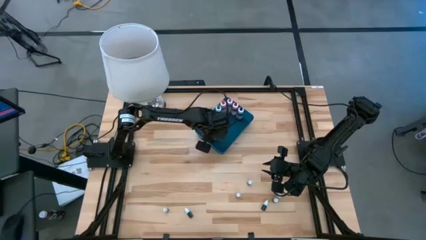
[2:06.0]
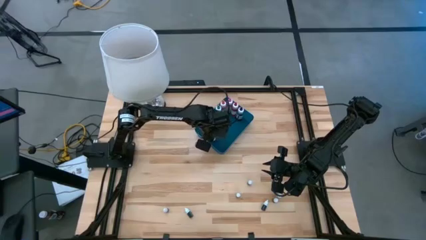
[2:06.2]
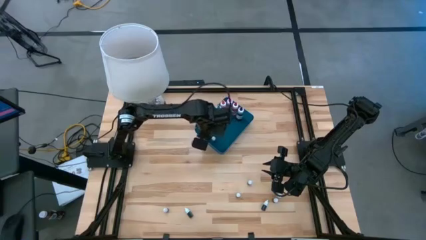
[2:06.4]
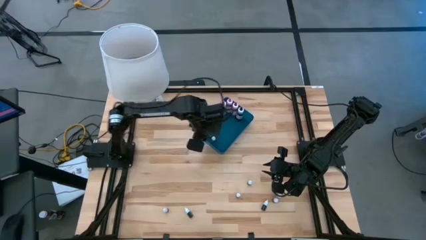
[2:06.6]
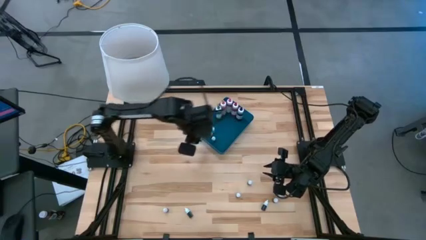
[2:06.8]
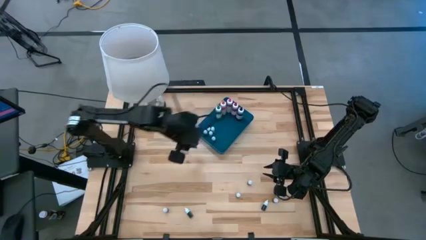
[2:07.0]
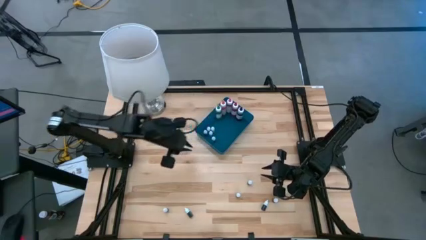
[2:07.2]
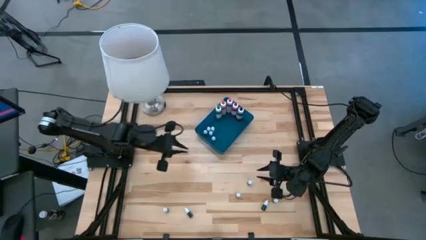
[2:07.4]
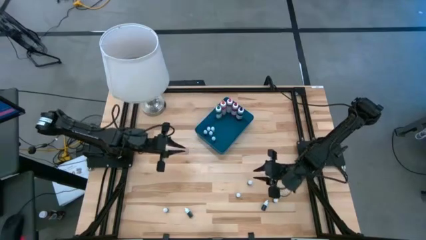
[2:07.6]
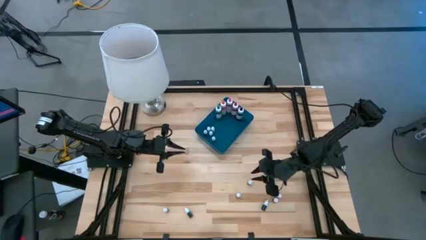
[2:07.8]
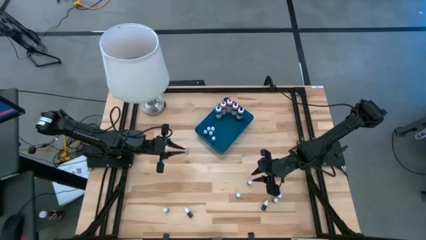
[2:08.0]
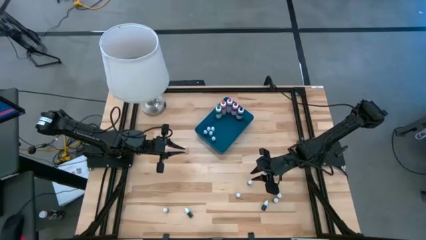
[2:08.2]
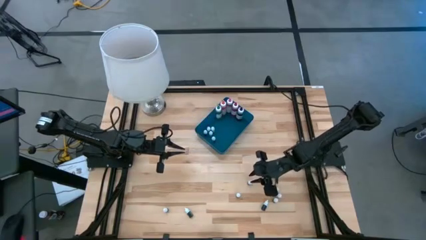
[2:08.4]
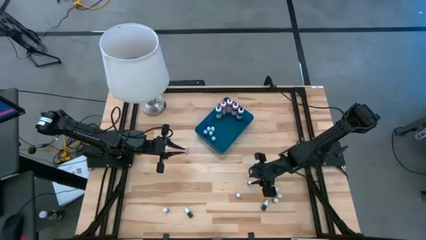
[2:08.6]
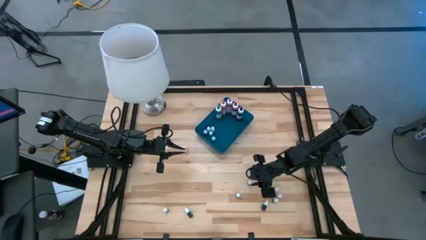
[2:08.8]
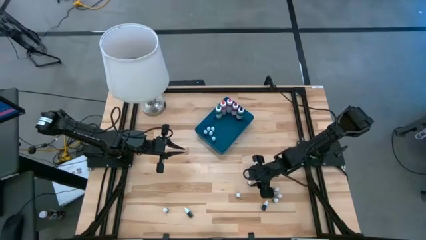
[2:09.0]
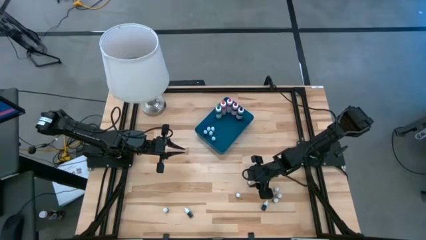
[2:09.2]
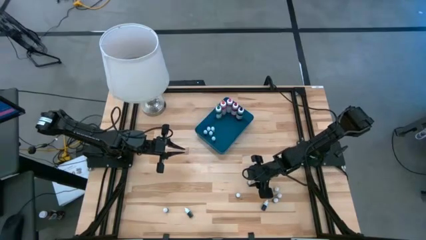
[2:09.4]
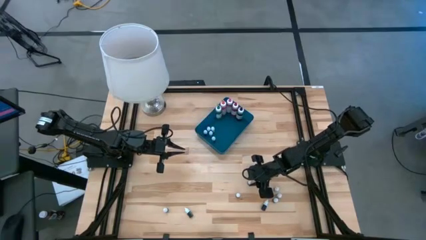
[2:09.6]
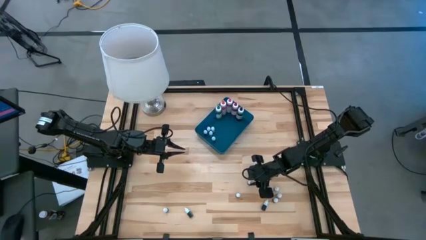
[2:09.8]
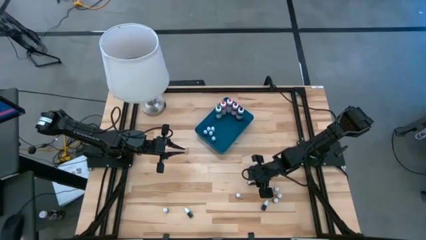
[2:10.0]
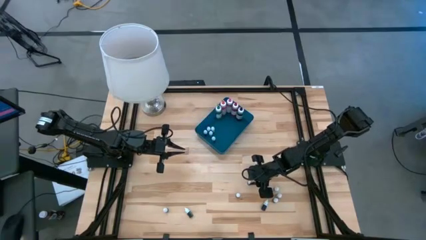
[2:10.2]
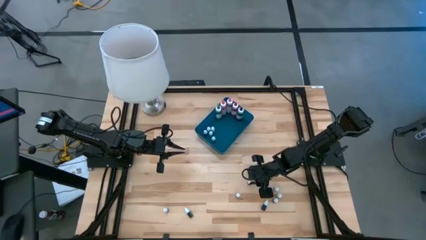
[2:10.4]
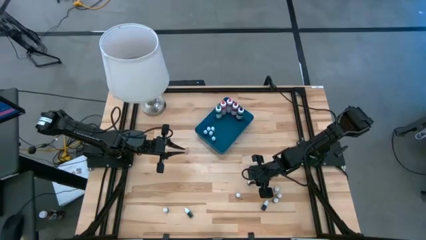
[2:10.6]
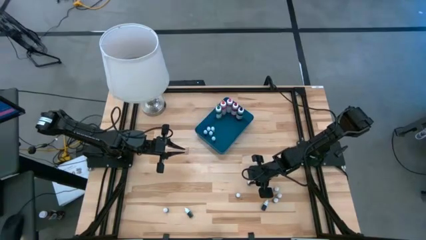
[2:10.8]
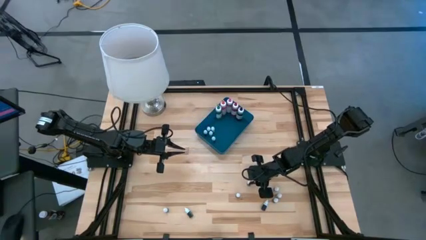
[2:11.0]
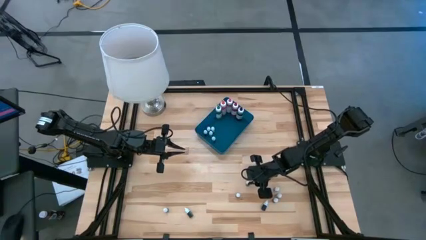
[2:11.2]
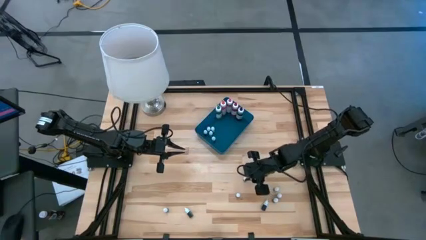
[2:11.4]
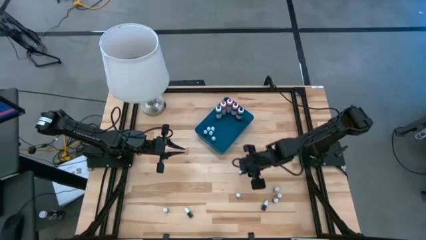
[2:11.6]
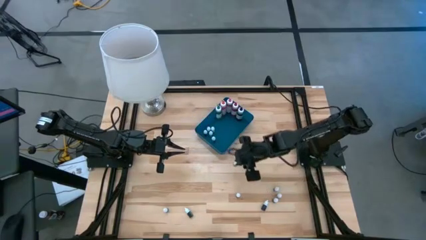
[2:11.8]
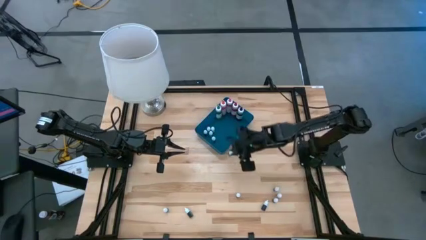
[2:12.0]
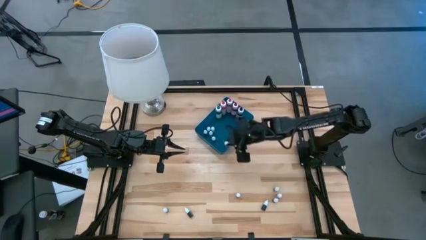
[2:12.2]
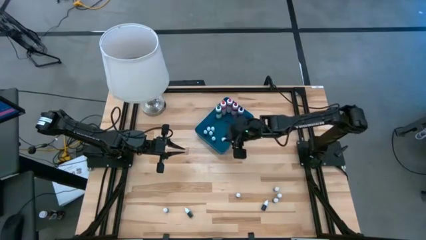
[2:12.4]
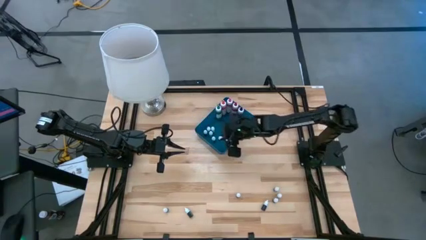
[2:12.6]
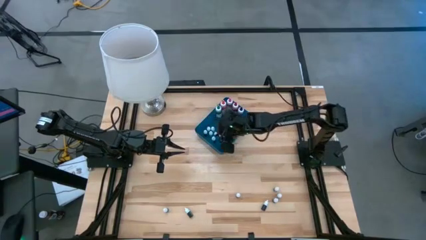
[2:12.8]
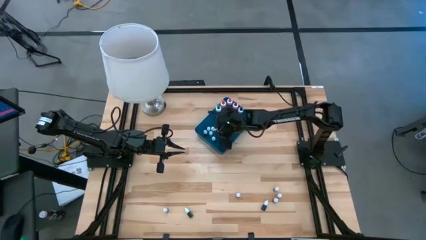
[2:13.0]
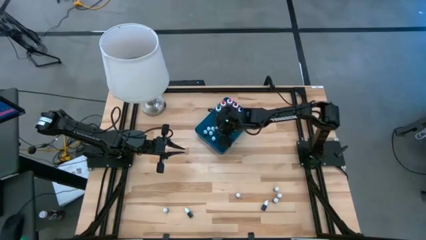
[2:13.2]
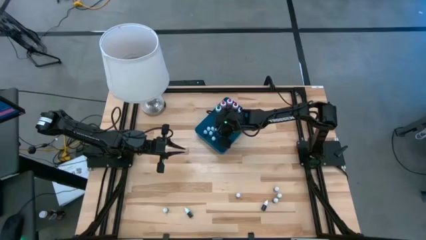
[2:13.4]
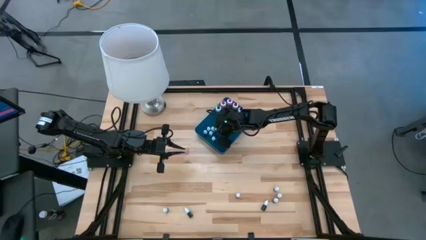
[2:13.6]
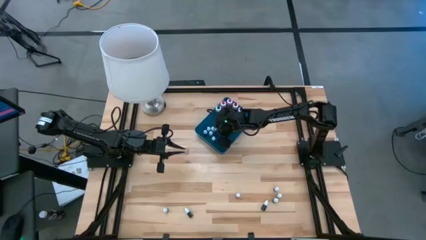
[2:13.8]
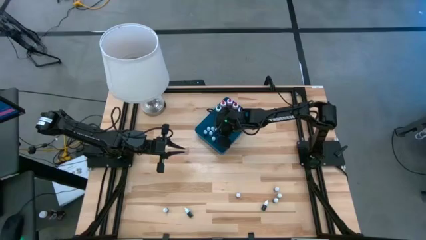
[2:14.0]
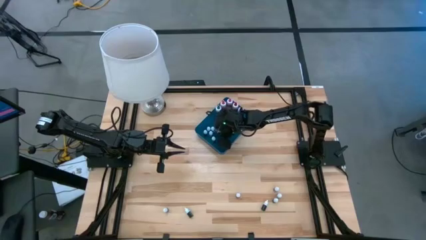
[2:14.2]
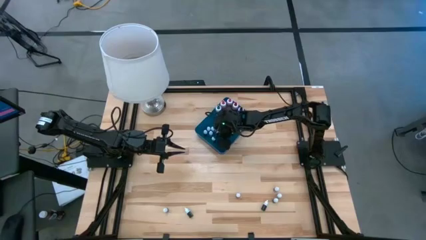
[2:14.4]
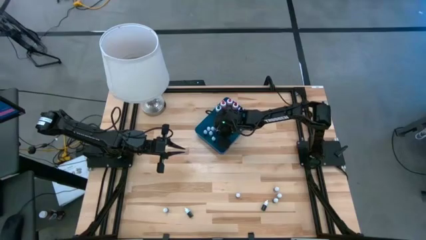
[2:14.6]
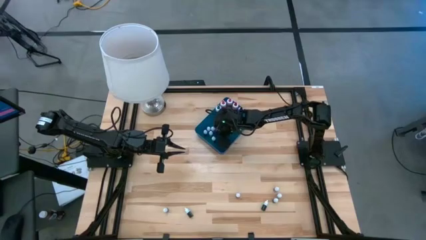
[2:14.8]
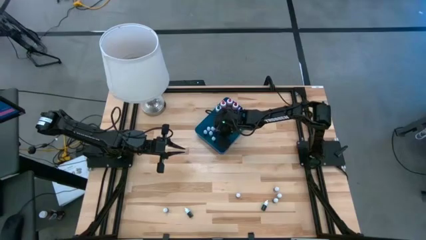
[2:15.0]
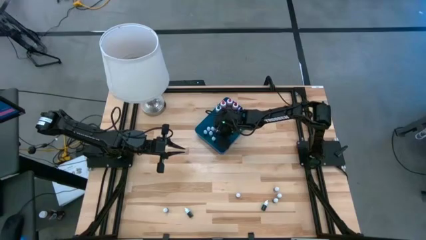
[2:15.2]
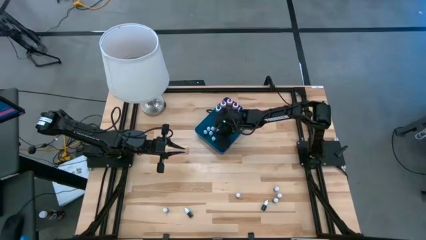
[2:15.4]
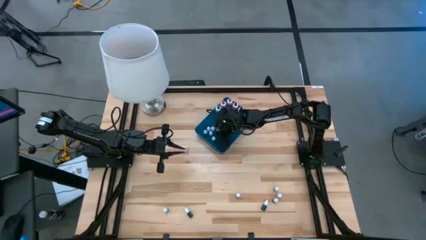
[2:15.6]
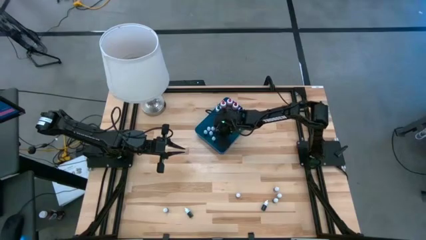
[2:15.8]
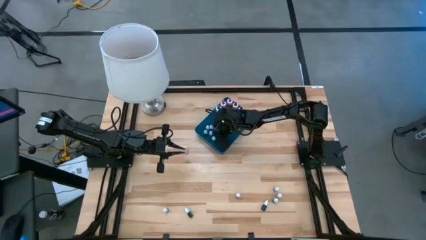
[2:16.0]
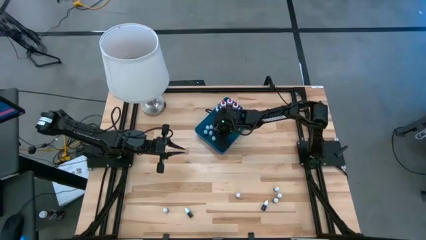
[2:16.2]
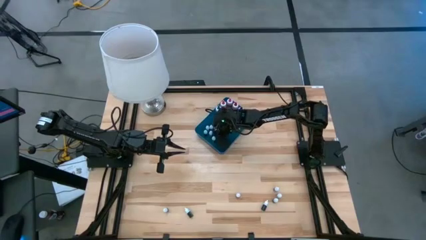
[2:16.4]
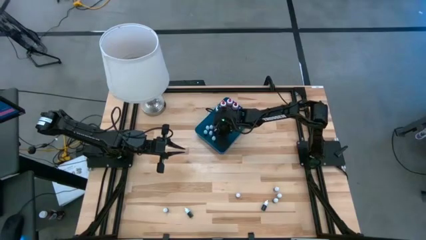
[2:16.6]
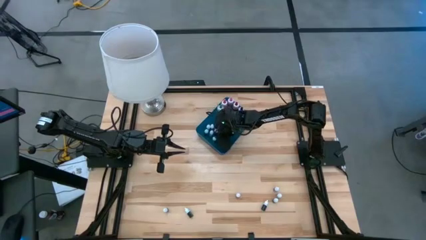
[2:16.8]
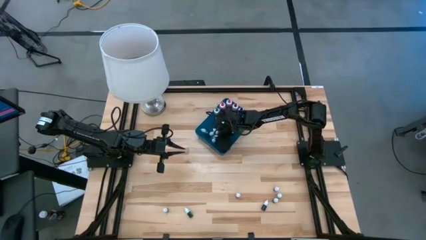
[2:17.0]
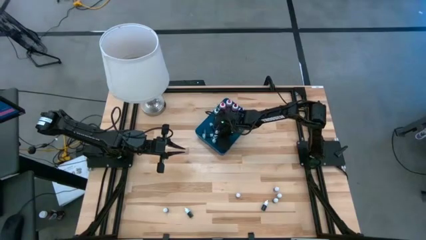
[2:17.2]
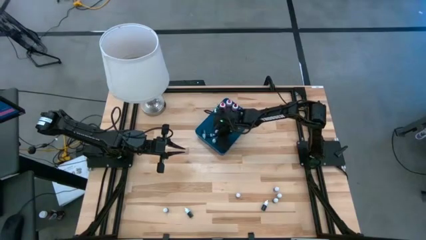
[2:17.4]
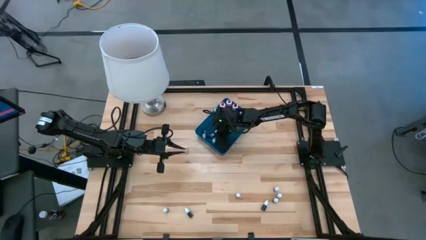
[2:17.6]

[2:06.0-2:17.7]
Task: Pick & Place food coloring
Put the small green food coloring bottle into the blue container

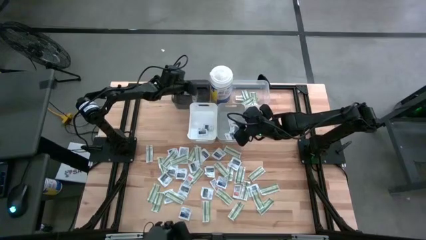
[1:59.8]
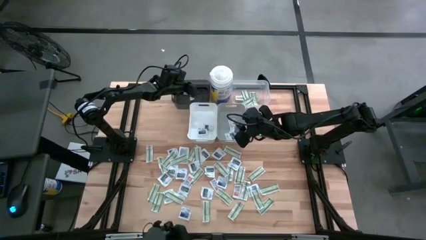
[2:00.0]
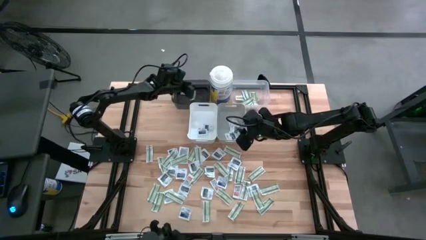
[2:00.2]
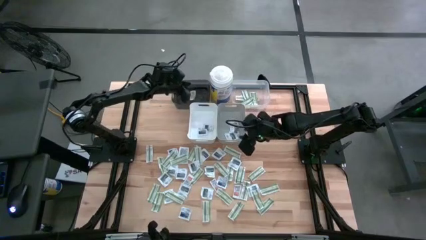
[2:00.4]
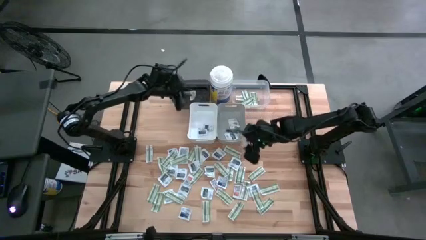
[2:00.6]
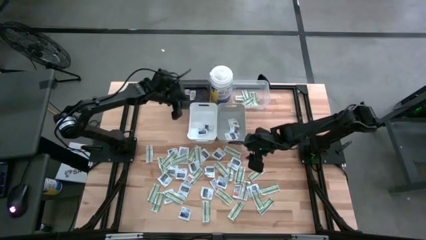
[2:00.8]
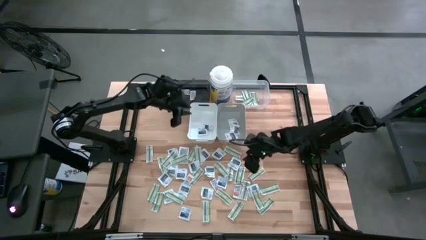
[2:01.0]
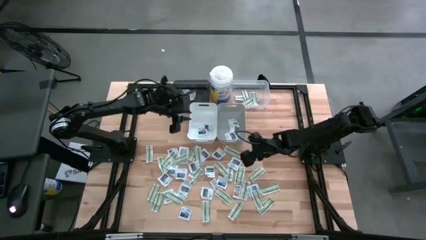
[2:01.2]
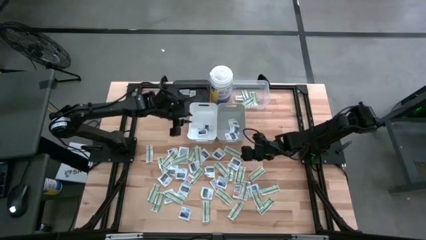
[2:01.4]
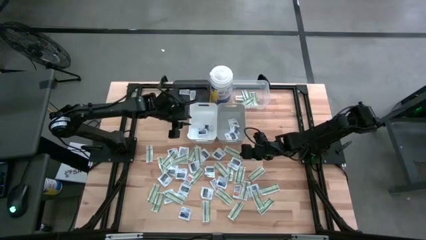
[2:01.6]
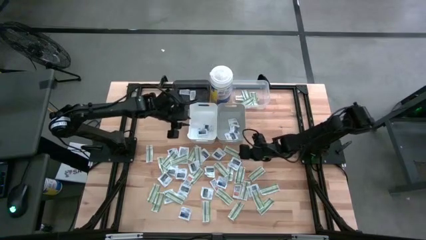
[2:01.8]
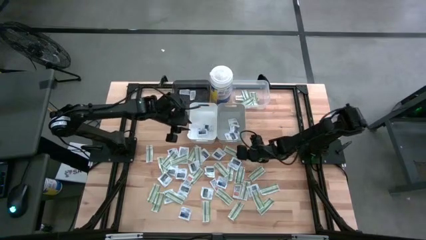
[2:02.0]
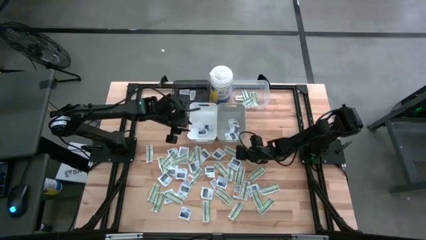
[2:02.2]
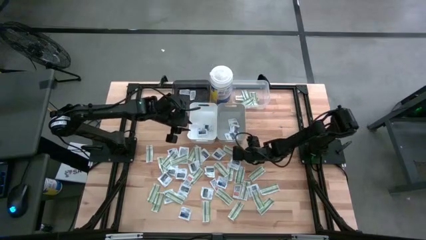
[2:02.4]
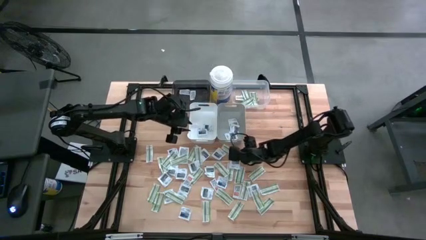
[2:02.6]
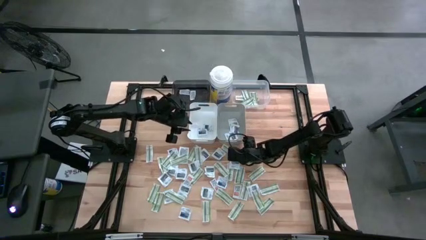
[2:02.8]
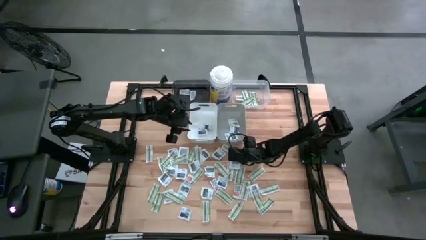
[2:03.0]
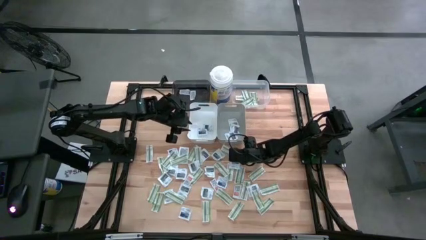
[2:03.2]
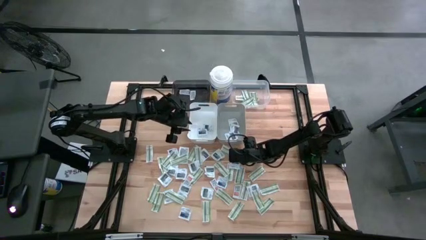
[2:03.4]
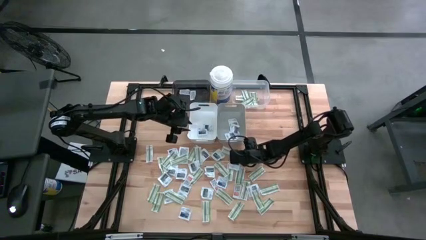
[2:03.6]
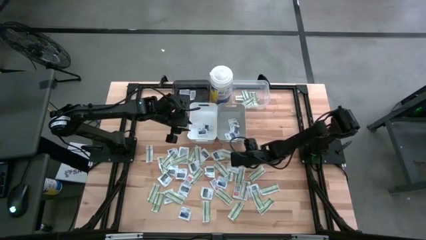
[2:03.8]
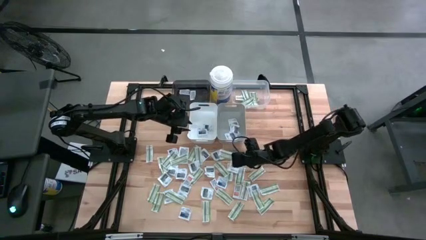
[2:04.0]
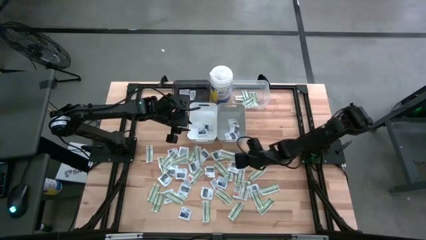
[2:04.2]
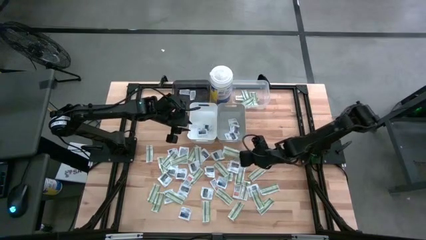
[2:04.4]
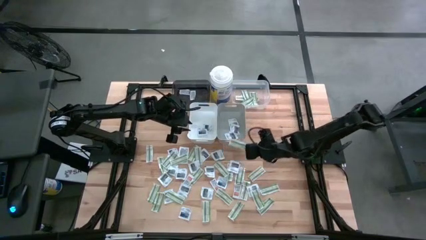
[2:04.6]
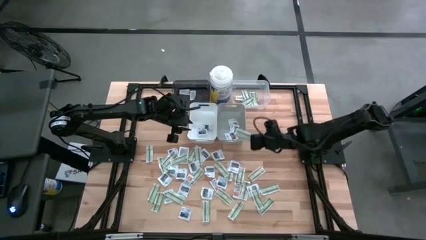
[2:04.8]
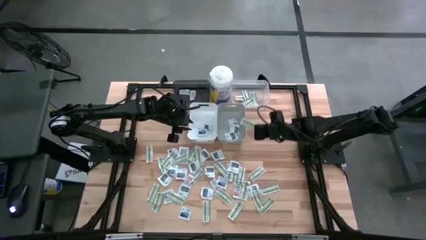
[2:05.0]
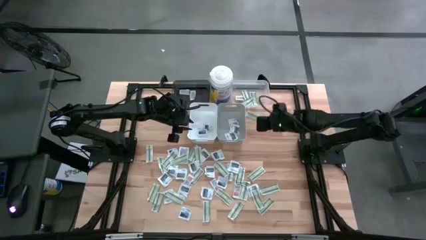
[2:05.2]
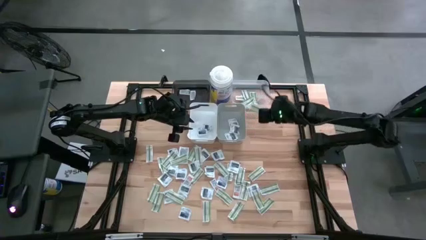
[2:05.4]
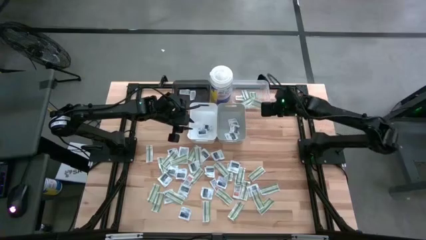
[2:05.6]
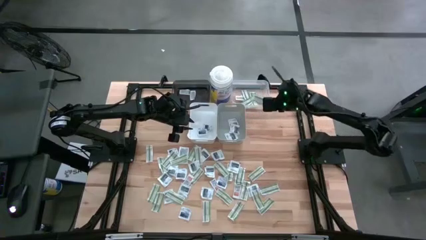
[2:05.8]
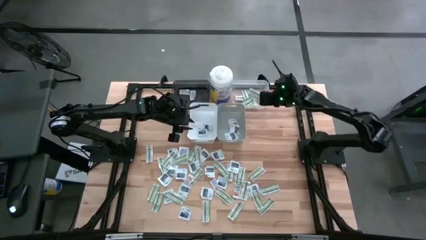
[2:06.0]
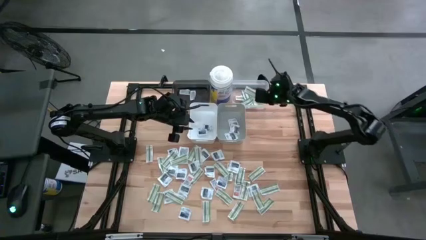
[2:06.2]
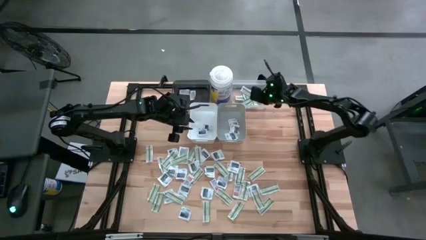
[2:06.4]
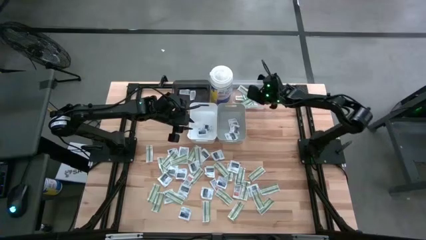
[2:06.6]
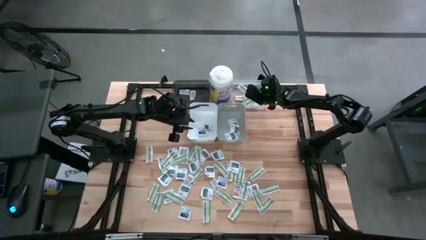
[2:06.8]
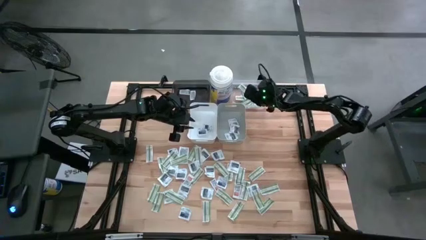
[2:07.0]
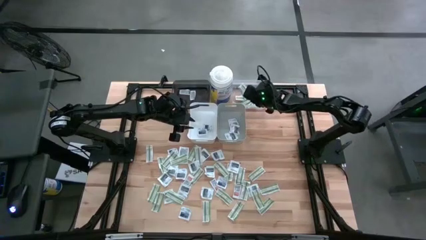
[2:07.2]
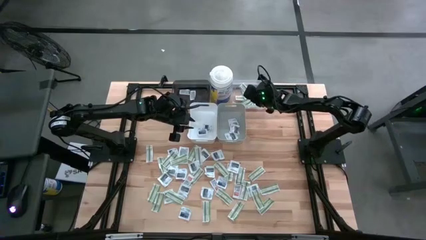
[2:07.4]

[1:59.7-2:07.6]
Task: Pick & Place First Aid Supplies
Put the band aid into the transparent bin
